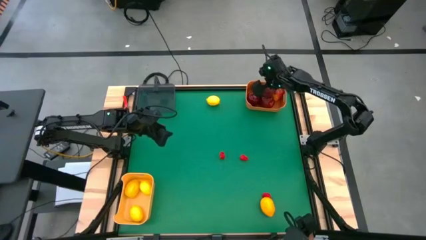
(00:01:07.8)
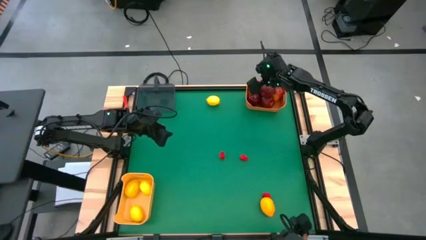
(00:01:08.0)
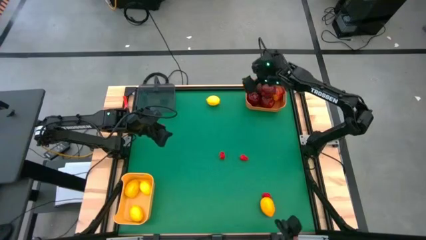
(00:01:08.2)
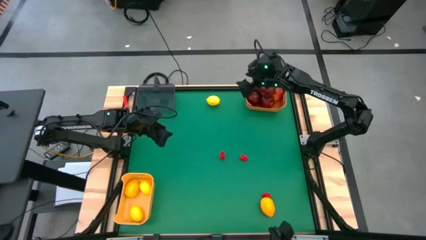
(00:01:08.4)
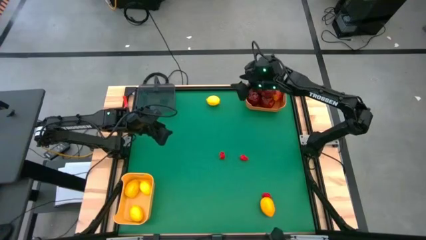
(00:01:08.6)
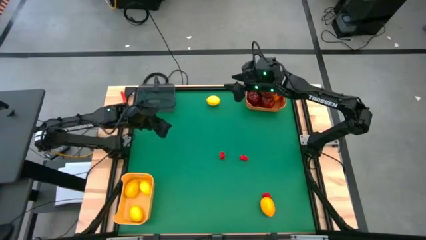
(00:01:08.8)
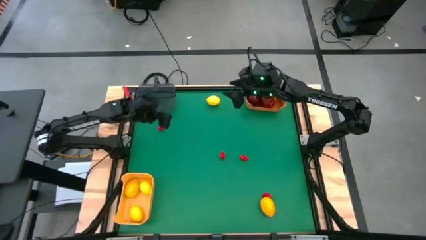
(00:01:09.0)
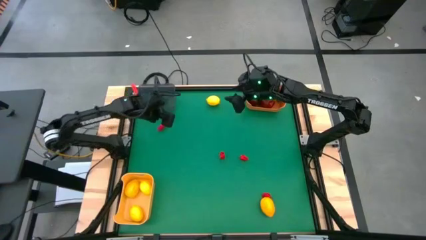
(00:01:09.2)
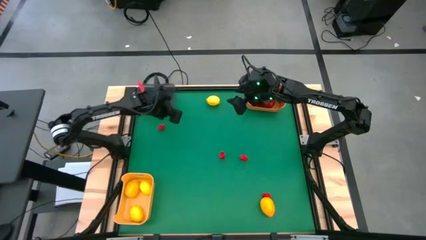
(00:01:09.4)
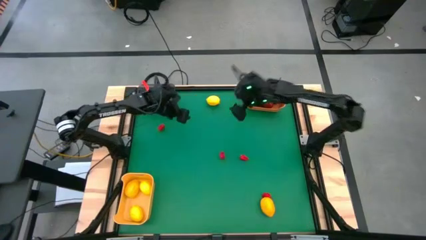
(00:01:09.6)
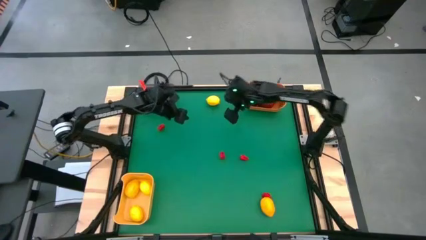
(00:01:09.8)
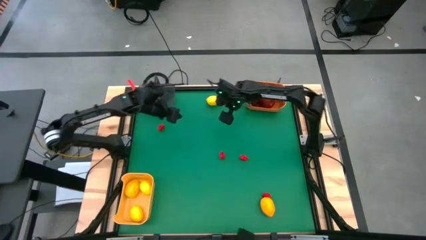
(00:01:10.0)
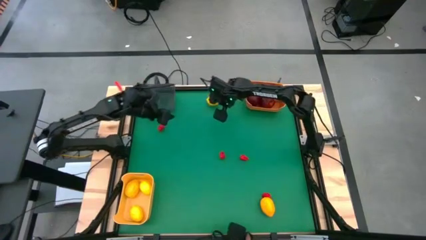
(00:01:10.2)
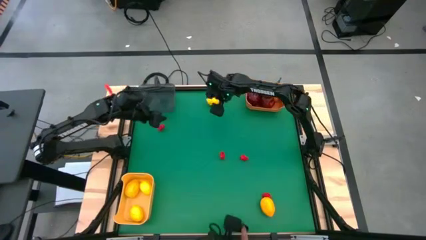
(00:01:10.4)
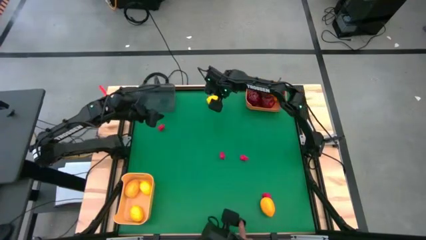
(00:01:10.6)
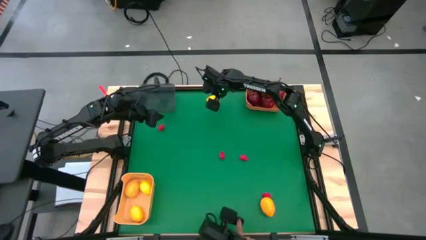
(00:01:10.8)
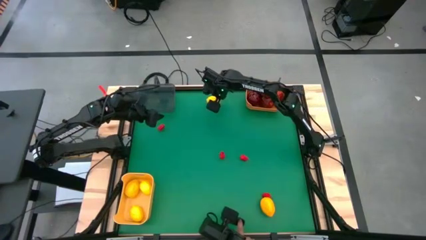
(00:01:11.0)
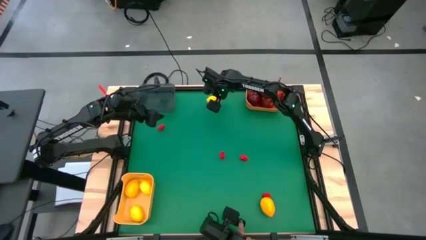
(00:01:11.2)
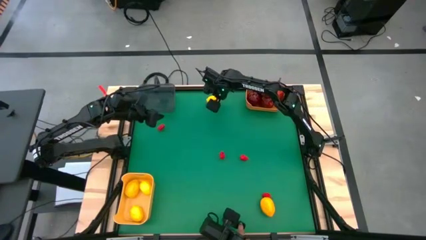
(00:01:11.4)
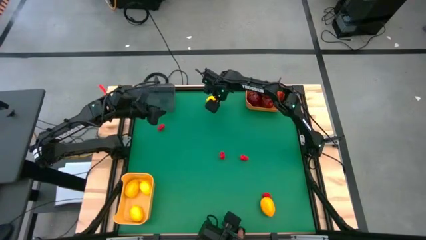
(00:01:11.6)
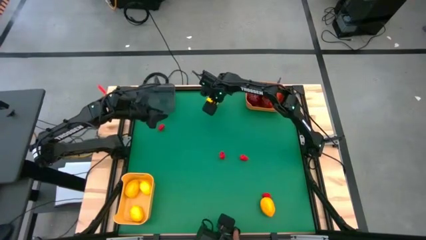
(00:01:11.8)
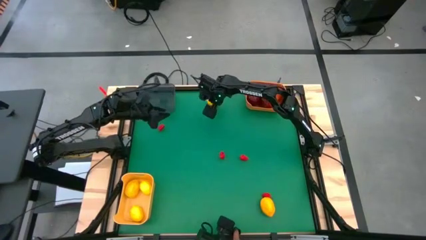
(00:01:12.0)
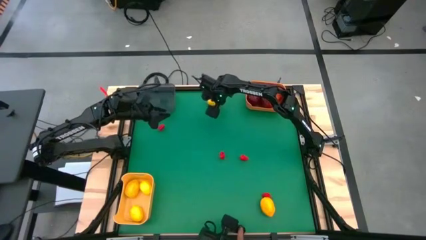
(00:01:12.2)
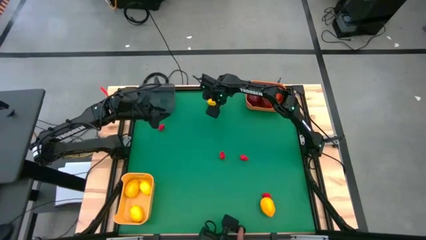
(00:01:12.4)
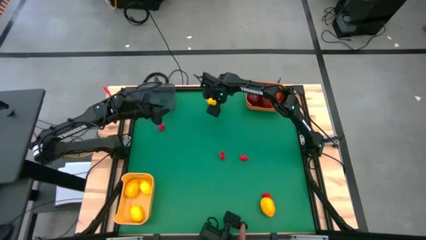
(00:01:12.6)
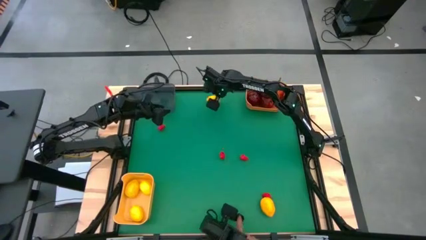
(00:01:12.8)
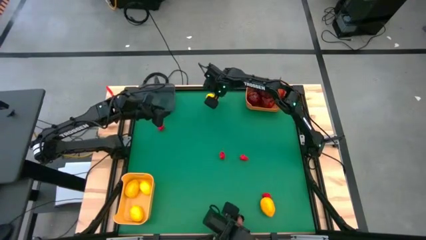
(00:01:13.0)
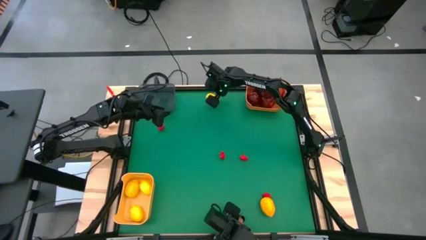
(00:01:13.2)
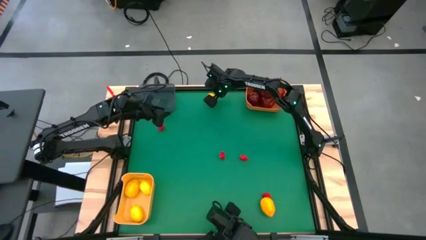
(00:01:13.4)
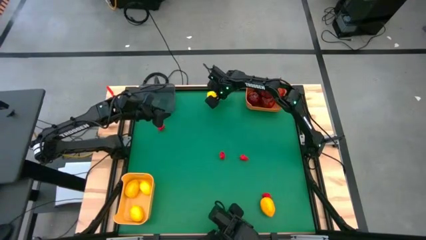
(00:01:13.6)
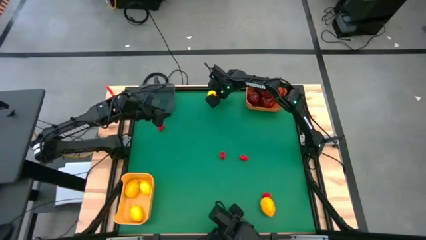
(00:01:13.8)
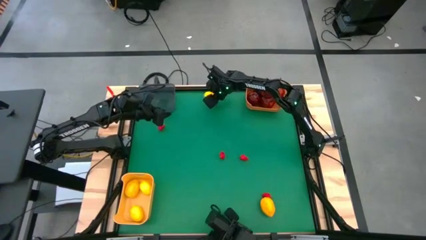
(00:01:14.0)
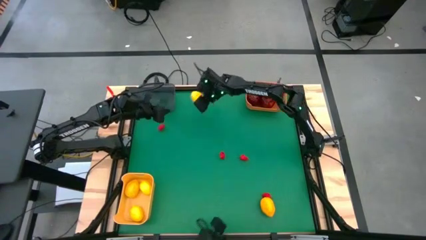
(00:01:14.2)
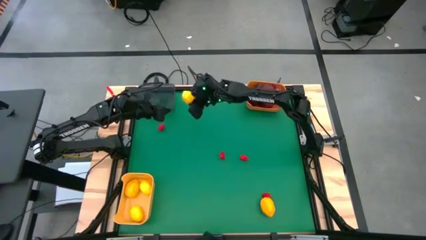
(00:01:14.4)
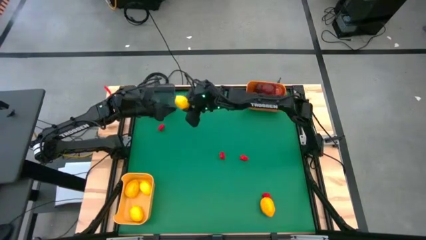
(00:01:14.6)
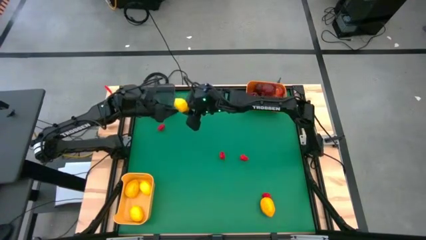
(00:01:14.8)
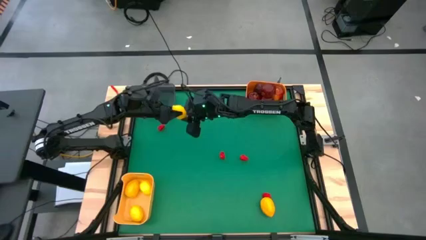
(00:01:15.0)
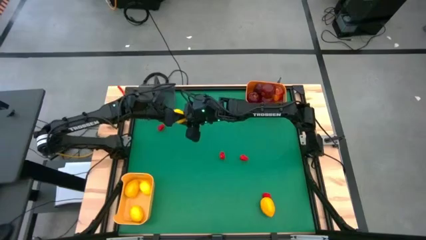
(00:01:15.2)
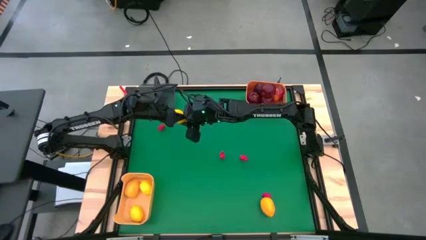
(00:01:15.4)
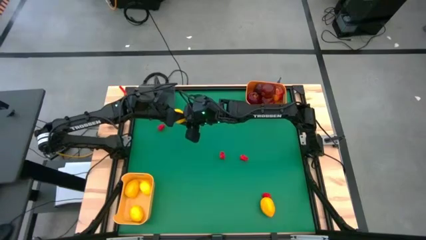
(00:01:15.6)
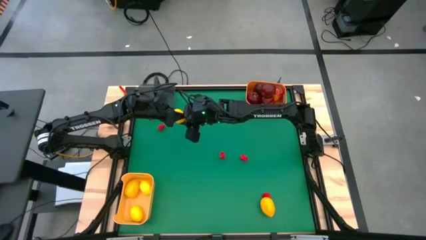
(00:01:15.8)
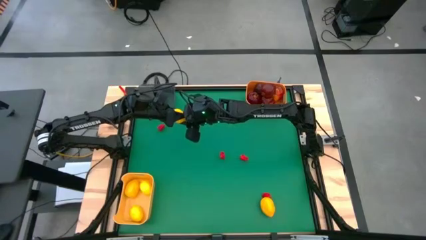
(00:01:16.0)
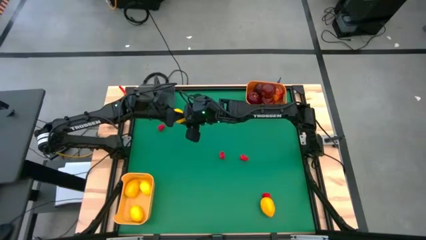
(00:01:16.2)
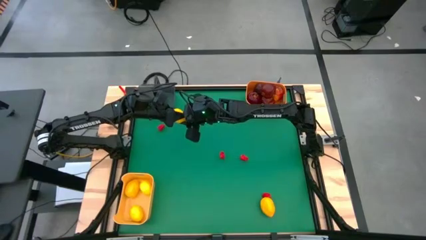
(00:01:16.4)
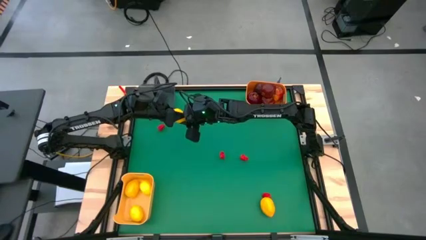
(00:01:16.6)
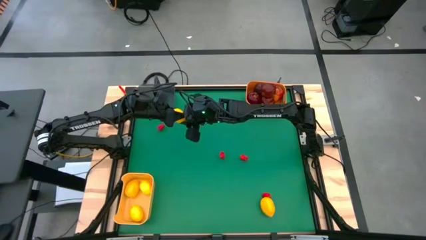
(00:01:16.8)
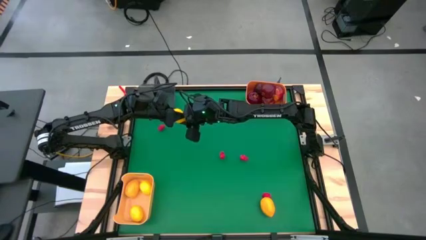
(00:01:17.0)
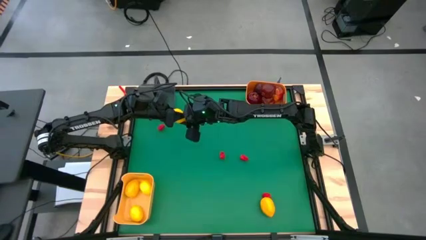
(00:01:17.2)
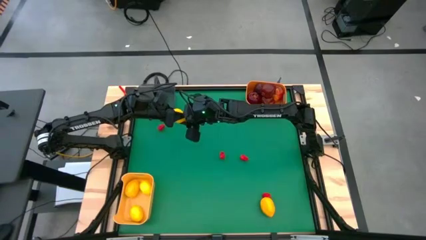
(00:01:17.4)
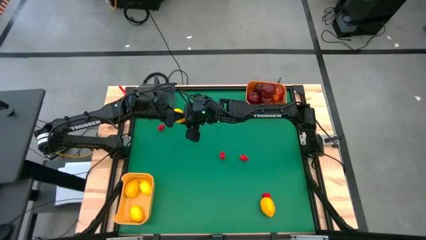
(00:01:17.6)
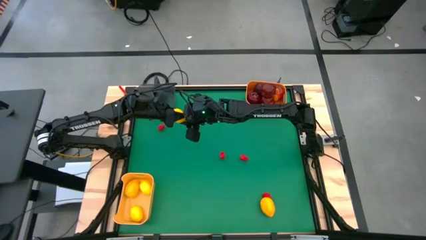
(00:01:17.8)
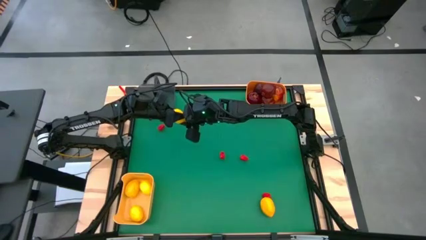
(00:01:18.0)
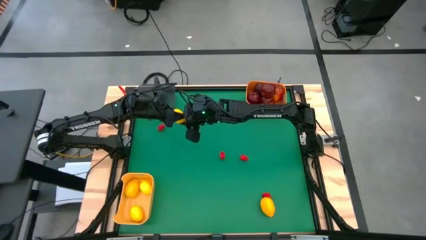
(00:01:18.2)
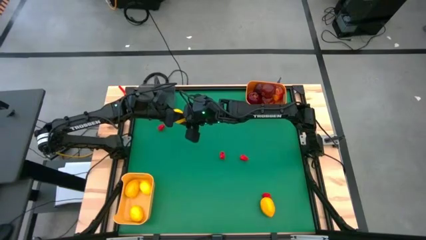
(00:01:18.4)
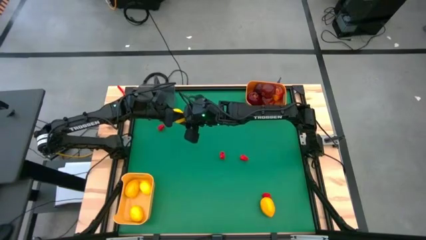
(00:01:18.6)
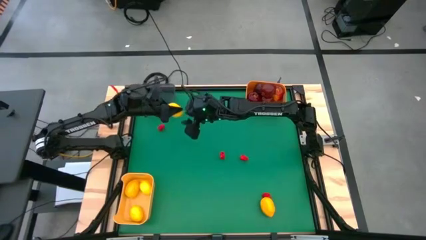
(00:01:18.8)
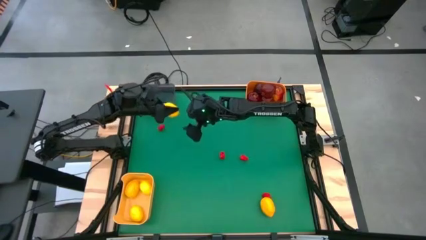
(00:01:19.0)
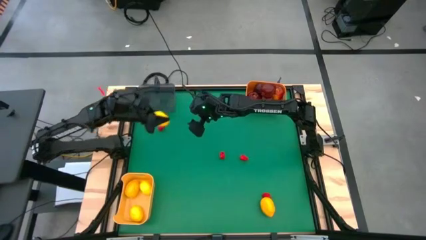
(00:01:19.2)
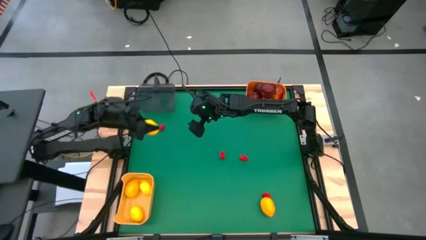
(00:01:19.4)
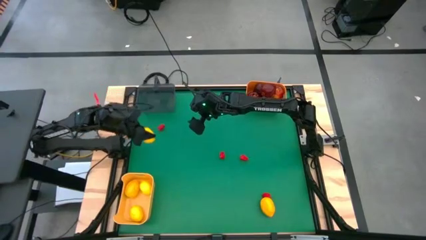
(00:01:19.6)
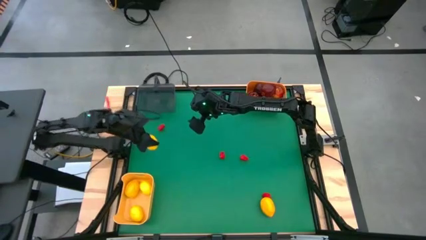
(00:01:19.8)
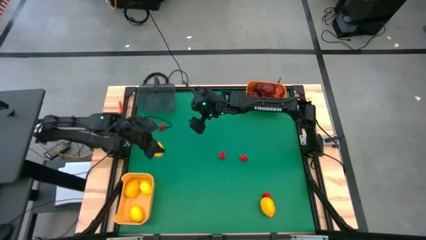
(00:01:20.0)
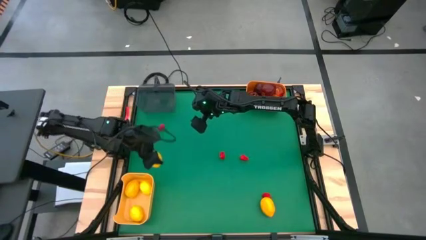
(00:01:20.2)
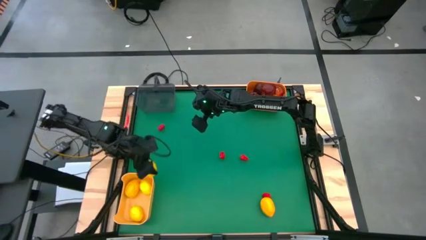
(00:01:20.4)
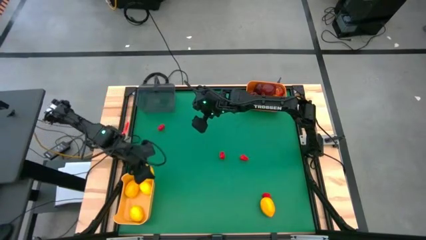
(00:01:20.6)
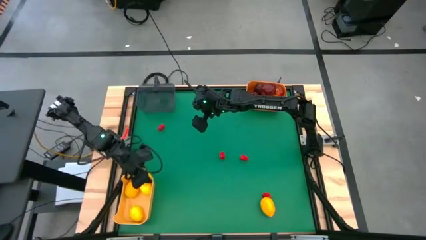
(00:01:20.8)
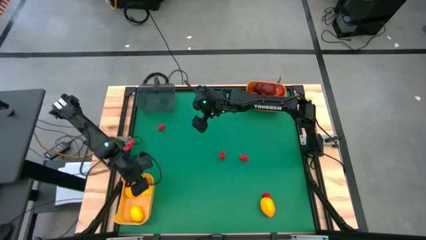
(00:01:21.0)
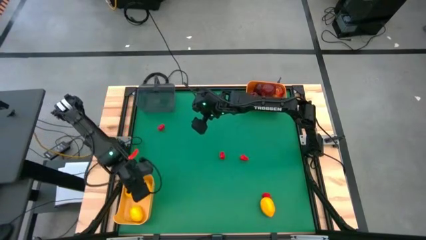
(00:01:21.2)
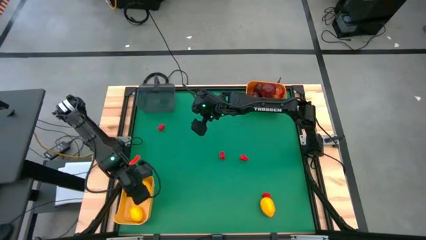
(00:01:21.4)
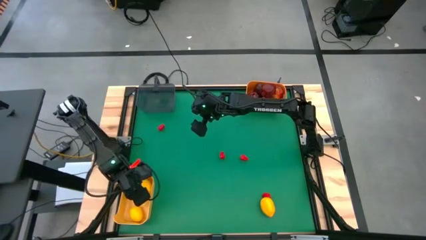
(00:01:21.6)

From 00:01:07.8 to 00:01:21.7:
Task: Sort produce into baskets
Put the lemon into the yellow bin

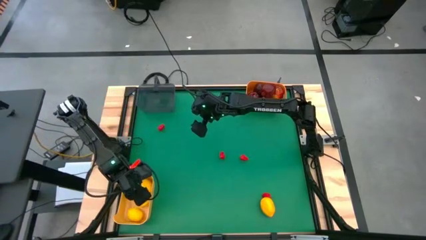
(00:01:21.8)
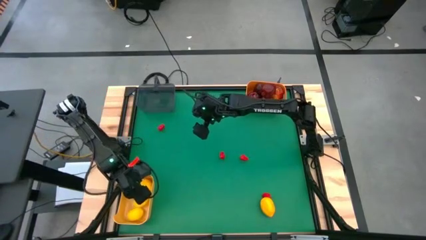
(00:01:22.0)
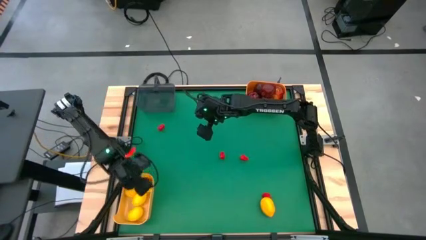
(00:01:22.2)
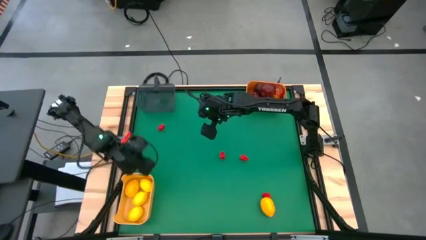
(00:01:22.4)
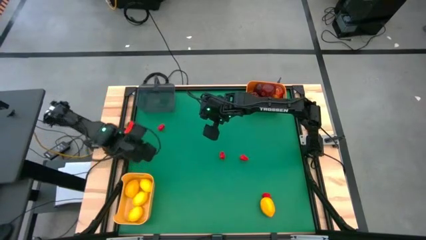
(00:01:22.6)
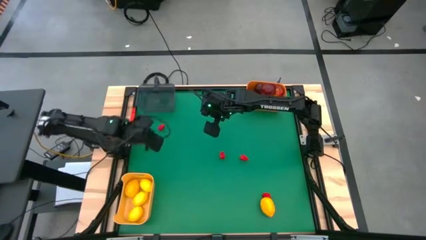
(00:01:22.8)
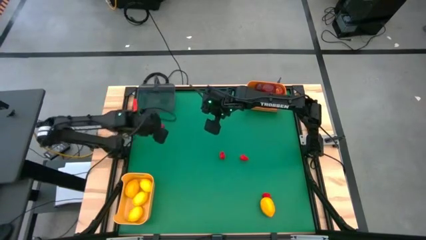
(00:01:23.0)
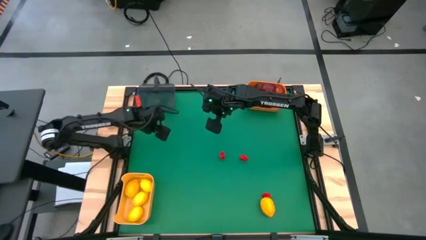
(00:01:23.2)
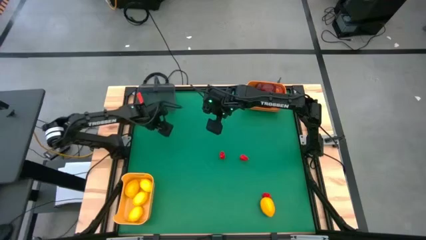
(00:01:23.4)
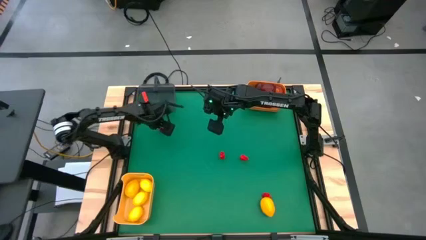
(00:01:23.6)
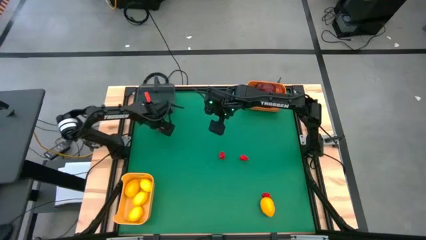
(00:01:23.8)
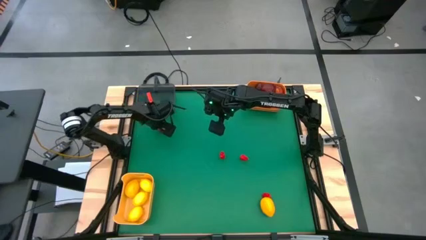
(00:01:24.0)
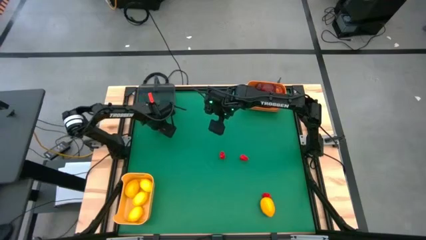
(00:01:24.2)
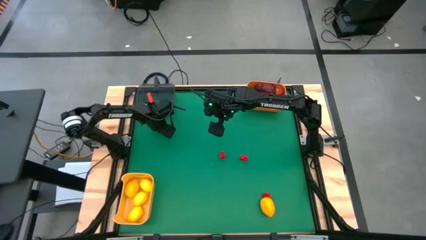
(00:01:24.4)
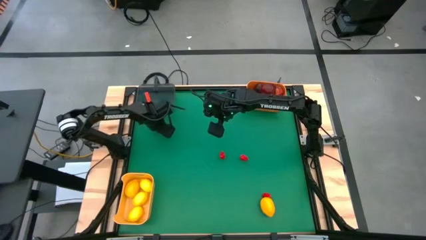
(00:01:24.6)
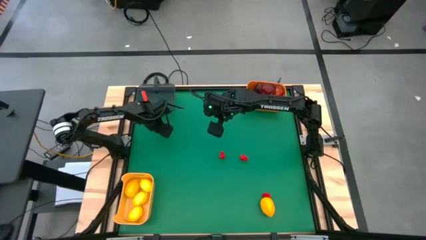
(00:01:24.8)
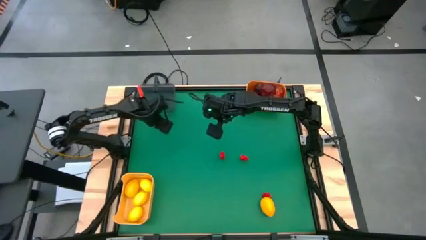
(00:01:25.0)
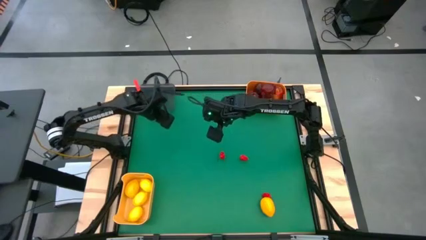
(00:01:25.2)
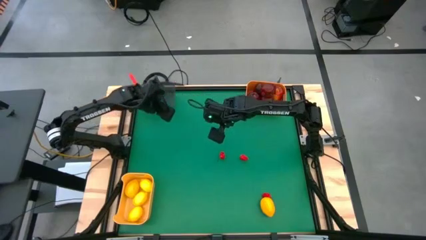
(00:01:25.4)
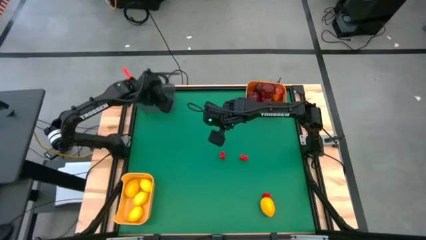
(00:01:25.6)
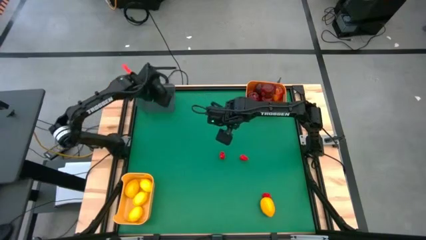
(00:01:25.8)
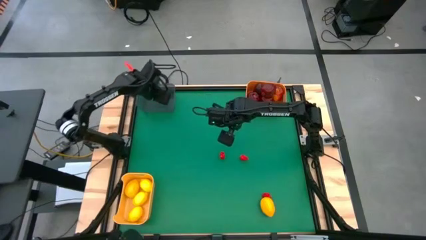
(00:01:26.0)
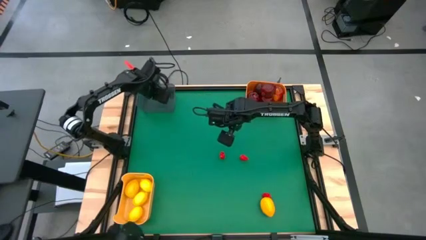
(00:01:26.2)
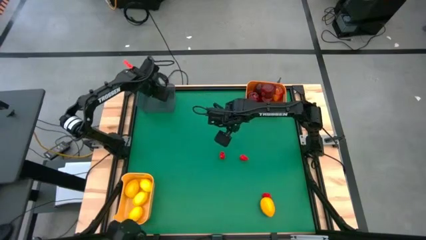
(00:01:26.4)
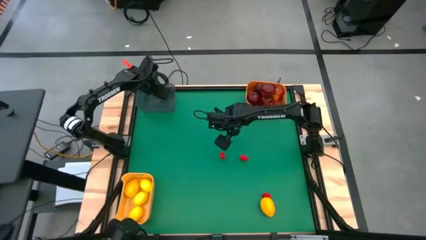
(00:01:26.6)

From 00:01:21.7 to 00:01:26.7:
Put the top left red chili pepper into the black bin
